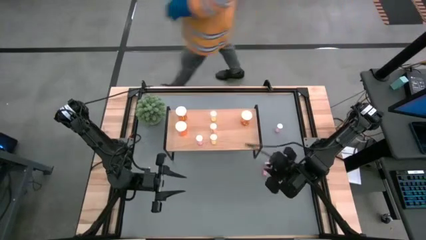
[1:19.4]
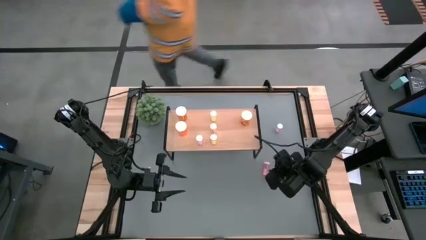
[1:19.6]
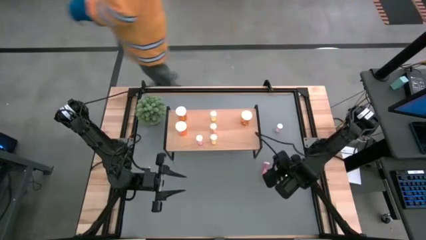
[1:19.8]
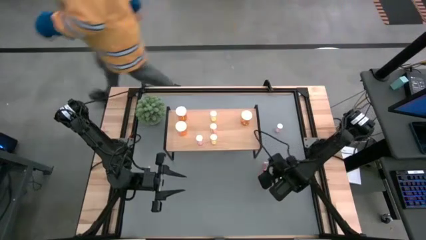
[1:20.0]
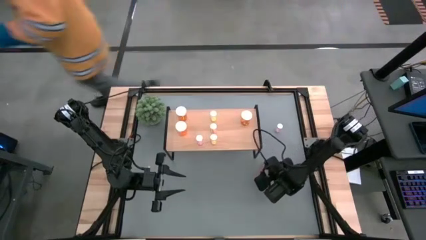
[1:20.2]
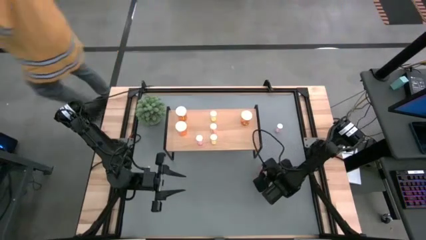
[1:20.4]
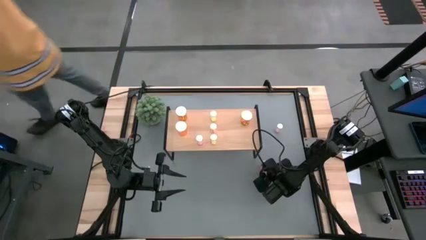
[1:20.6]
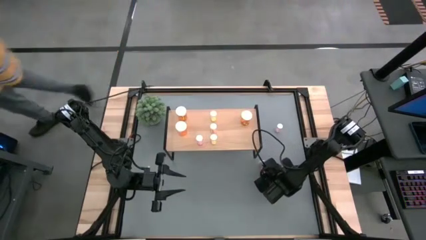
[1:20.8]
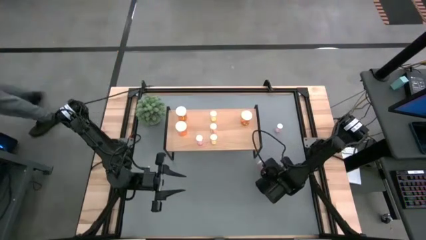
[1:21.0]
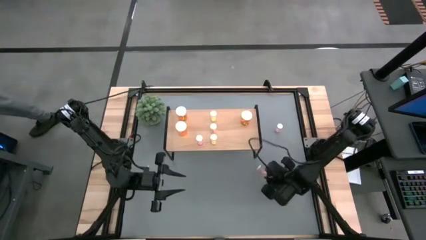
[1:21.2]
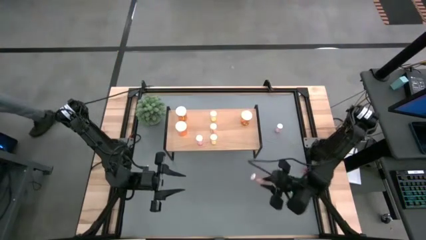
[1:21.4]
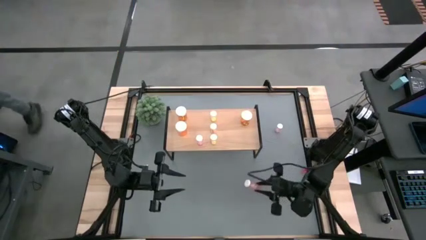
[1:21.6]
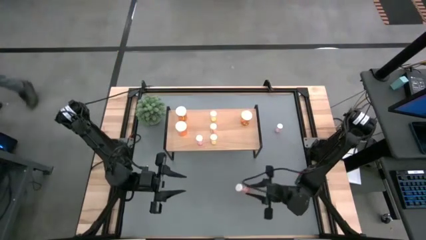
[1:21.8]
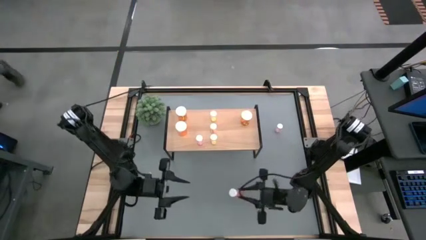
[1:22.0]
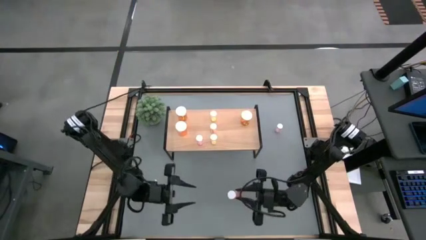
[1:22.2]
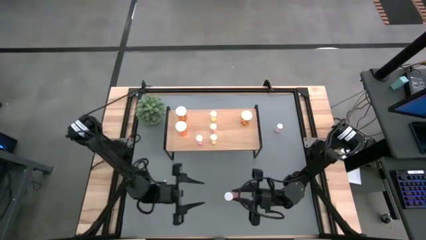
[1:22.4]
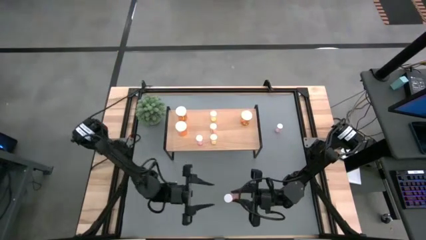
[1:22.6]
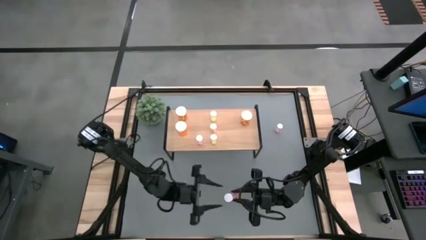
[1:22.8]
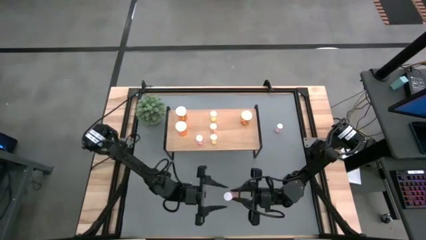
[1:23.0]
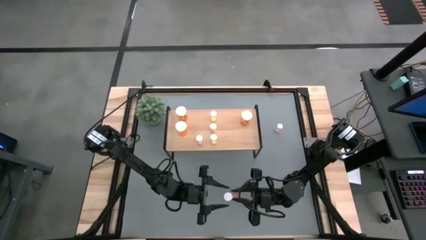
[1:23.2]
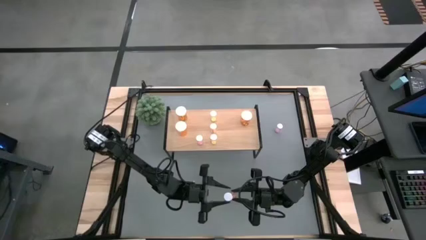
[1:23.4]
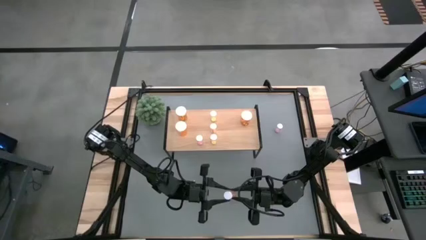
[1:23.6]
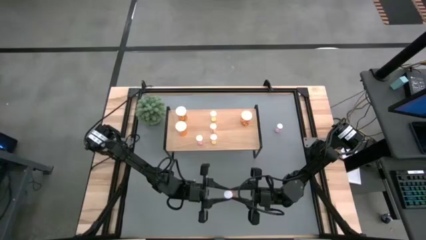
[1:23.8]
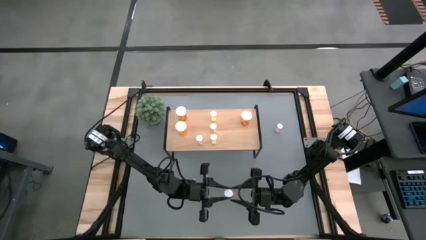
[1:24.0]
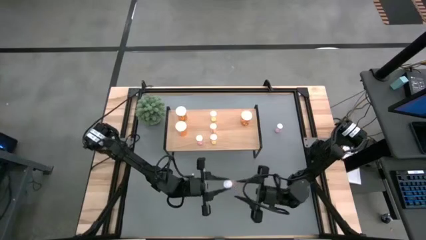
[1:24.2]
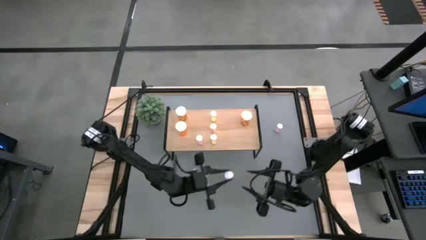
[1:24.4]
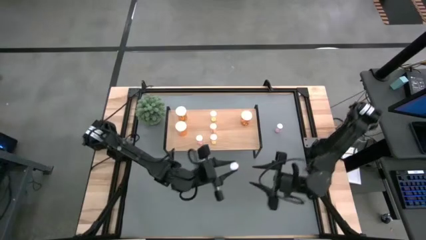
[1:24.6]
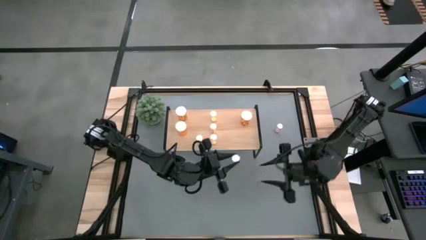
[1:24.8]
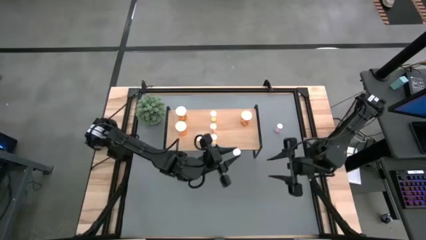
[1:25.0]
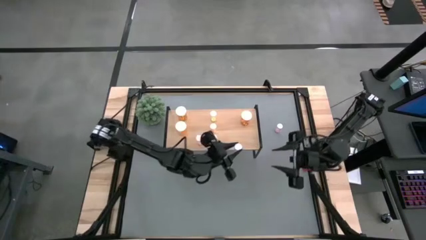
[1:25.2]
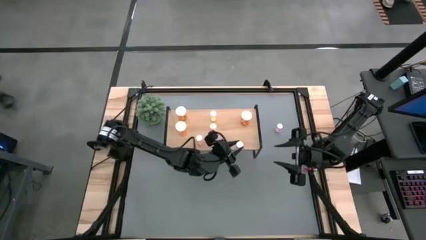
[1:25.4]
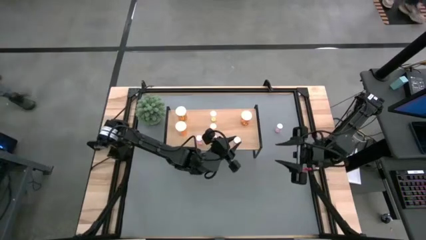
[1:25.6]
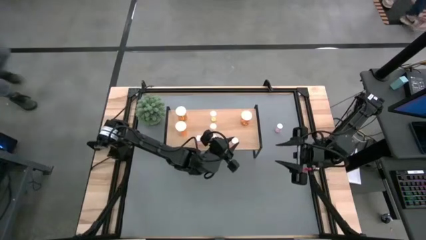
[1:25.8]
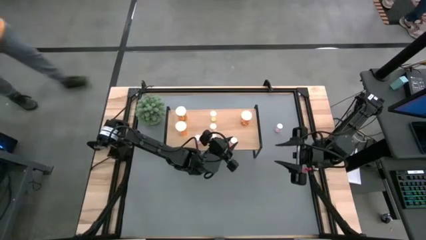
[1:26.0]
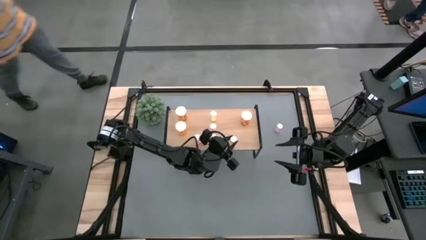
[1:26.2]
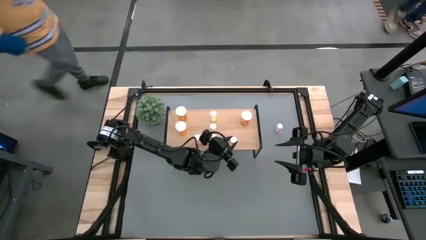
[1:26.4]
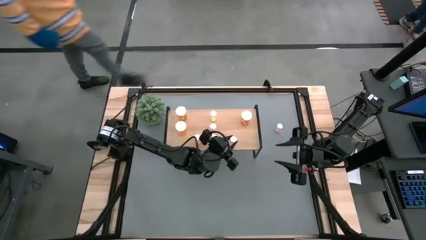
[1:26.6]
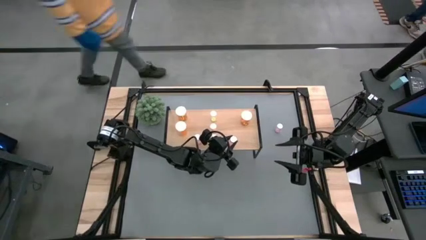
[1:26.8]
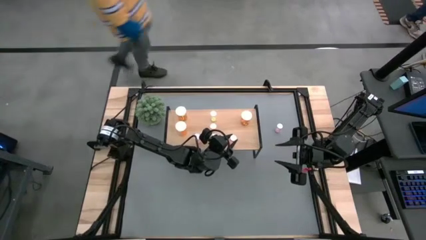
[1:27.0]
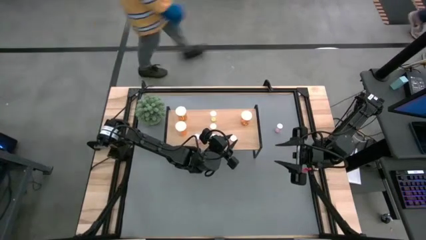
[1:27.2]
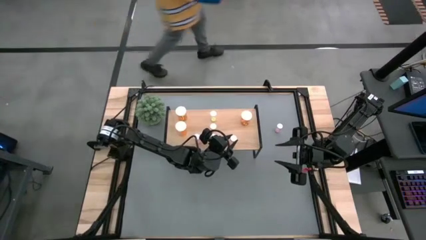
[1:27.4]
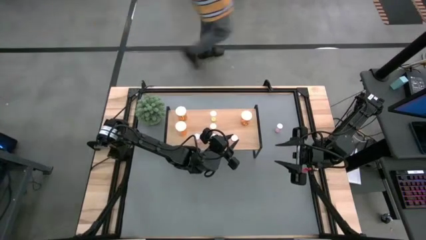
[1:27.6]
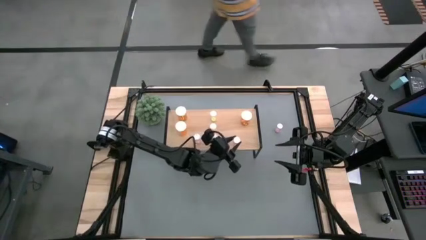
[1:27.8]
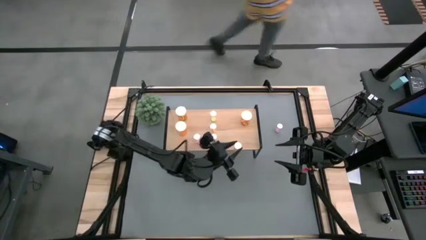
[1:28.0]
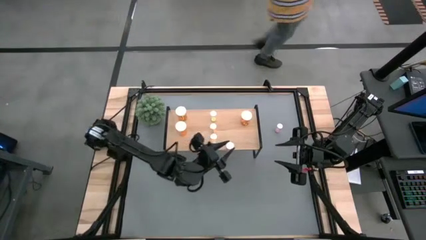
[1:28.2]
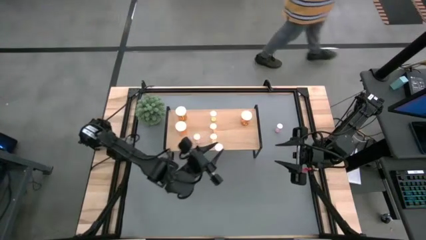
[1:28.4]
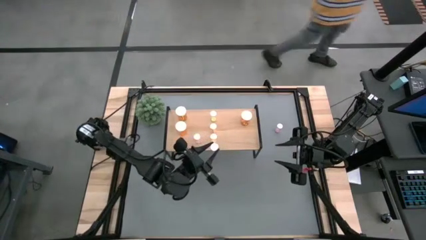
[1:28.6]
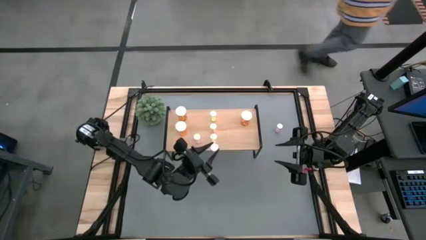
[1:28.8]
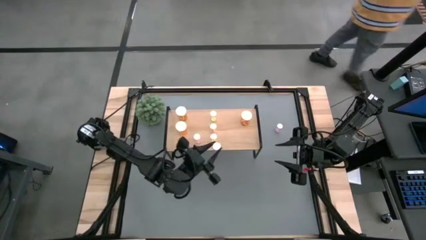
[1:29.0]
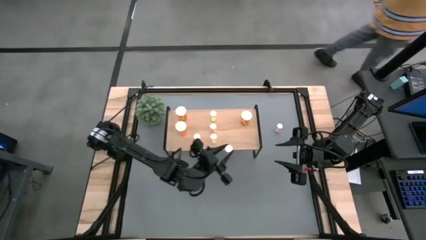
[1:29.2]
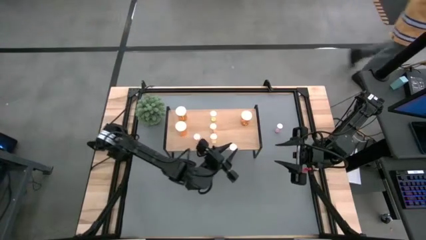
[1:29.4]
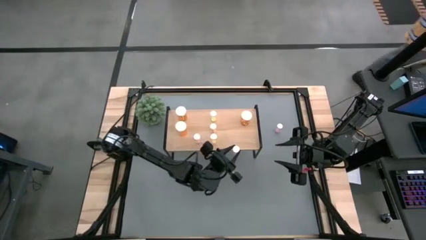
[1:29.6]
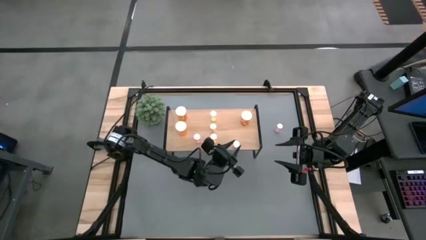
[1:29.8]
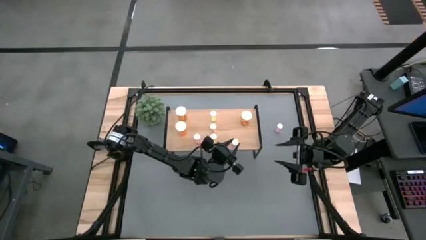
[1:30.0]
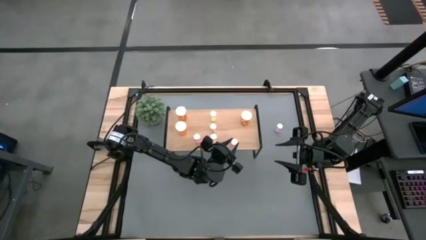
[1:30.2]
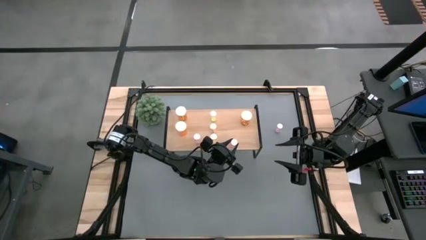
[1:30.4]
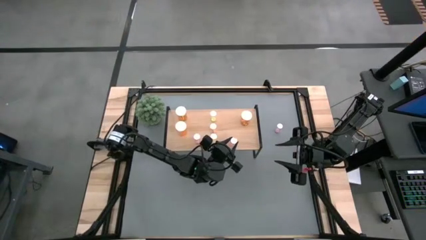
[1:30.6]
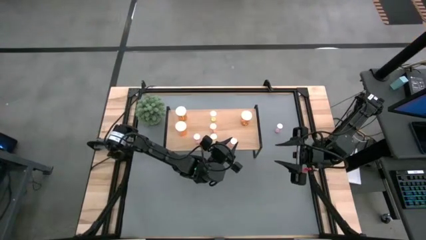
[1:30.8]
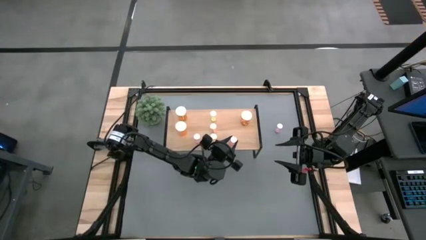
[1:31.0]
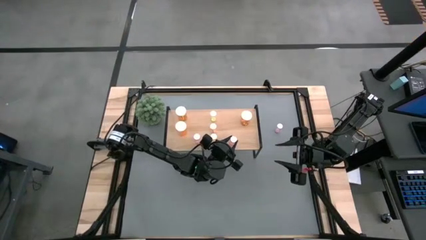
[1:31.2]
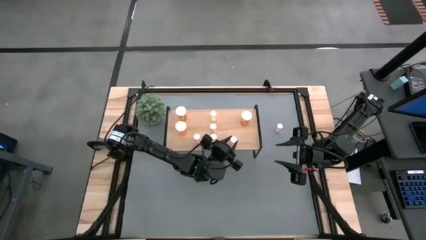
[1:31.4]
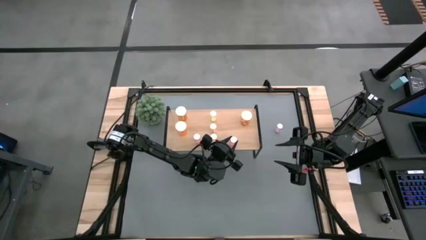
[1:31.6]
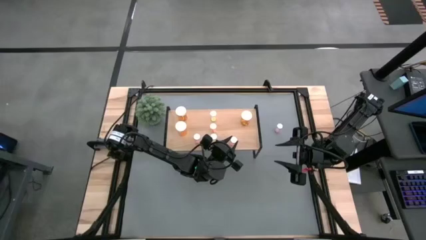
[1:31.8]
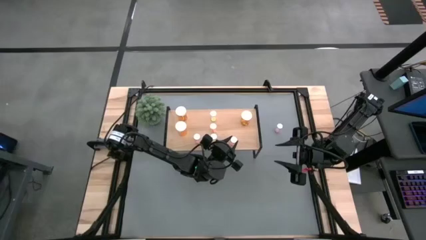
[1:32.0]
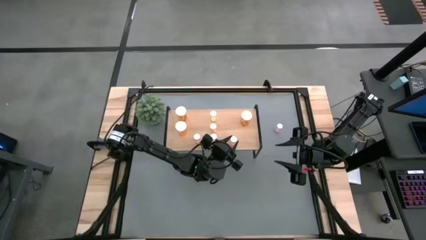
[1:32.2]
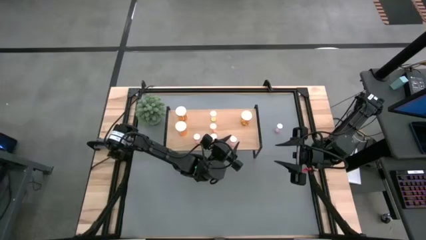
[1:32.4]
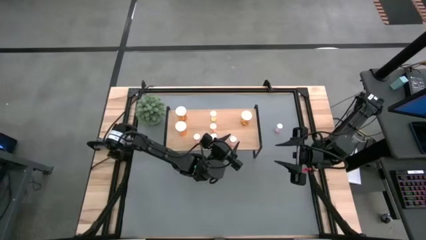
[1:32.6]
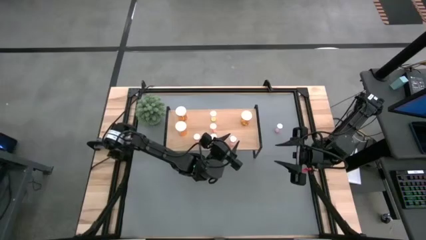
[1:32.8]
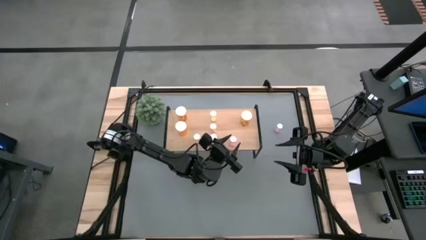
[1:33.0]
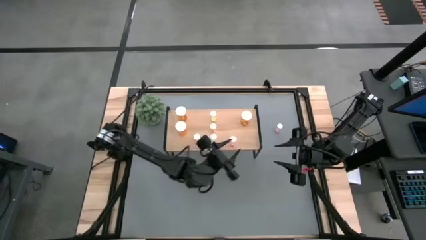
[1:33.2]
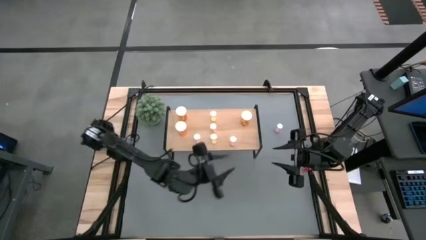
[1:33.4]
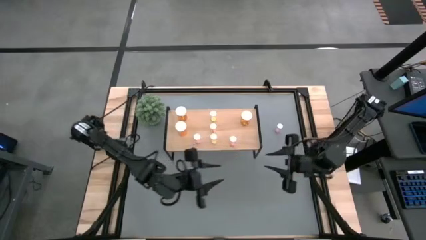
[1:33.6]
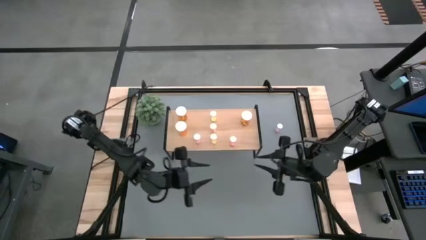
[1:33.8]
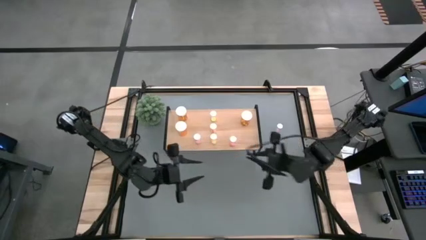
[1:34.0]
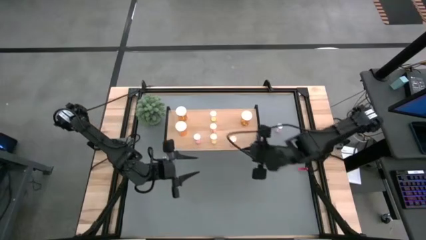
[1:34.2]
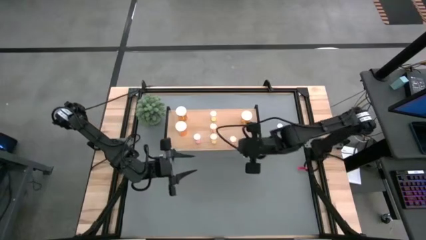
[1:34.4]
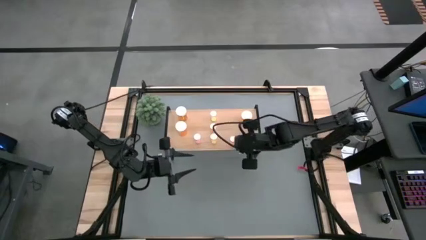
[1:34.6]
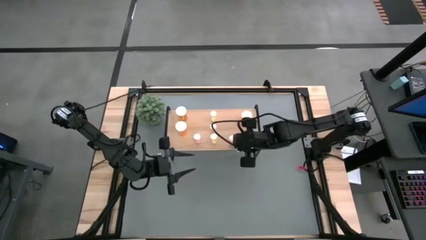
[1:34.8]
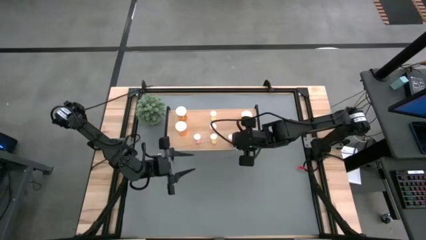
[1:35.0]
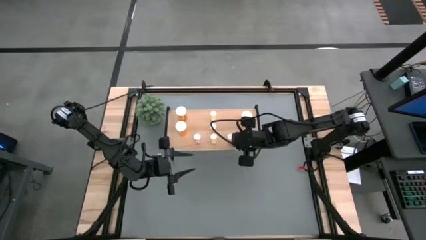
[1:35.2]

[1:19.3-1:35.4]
Task: Pick and place medicine bottles onto shelf by color
Put the pink pill bottle on the shelf
